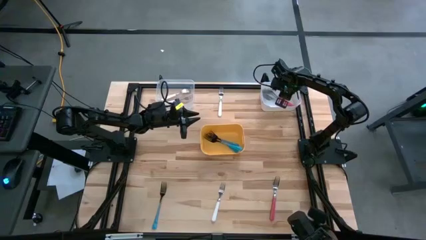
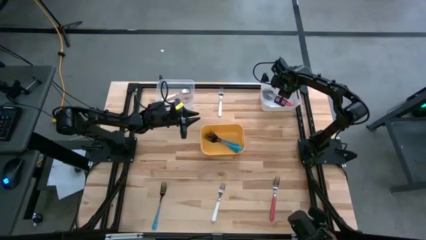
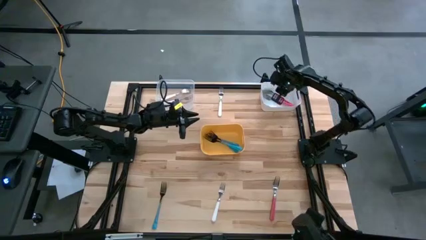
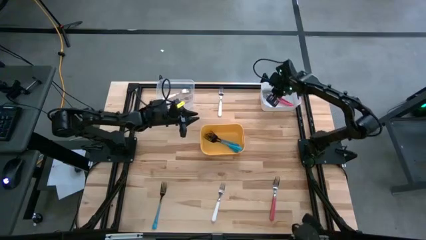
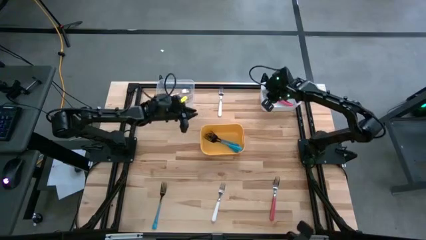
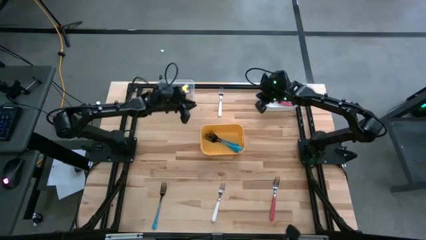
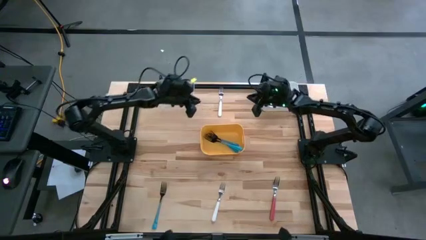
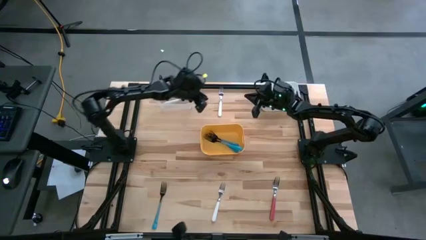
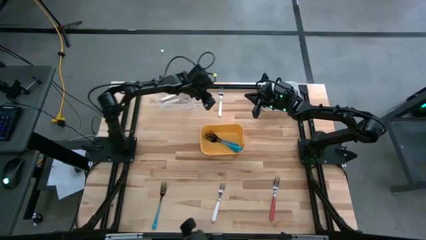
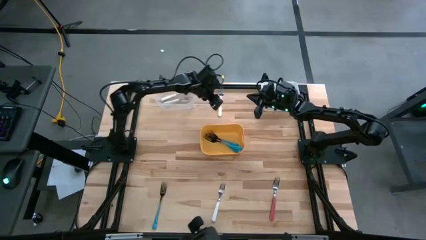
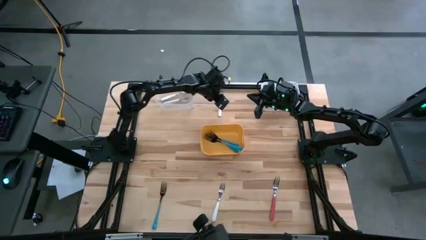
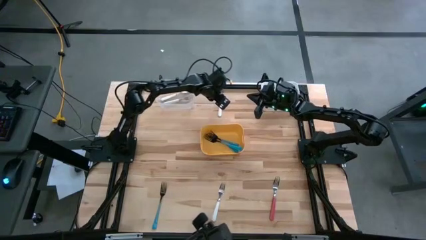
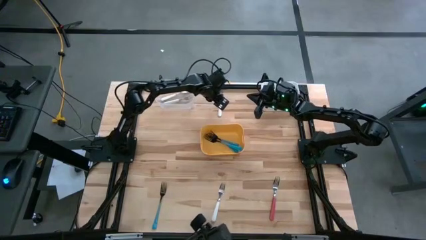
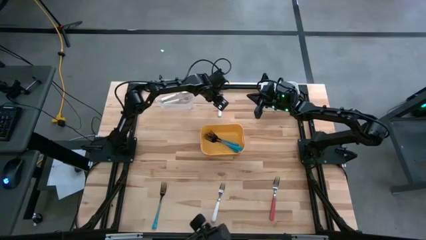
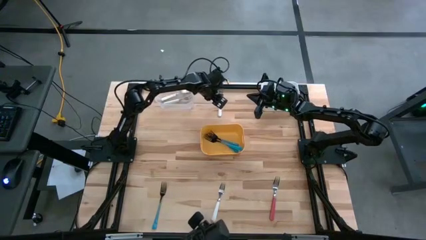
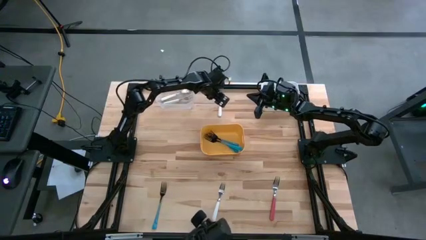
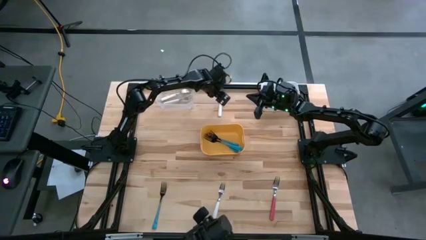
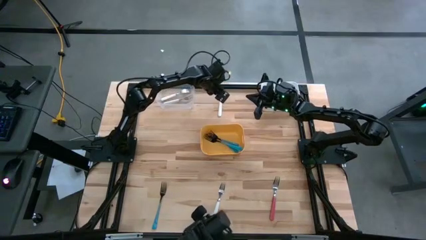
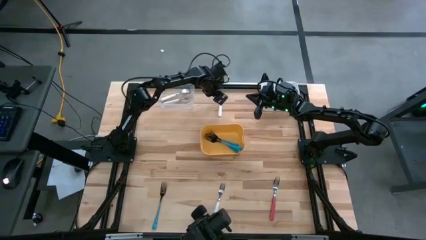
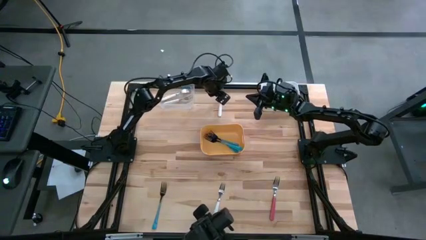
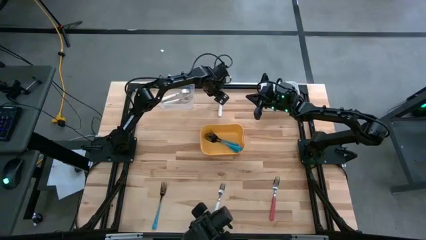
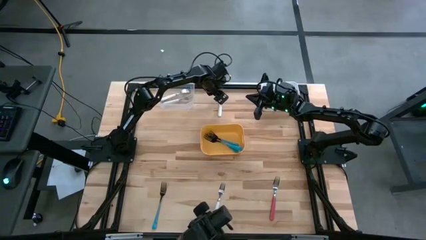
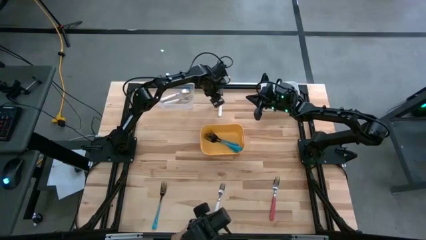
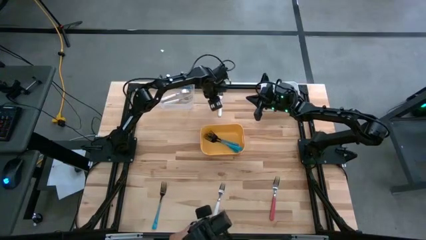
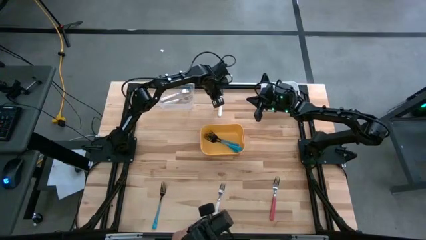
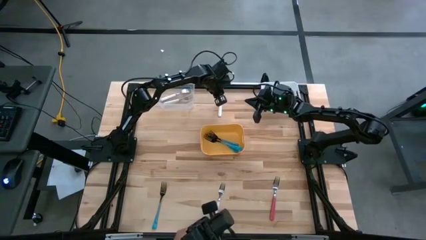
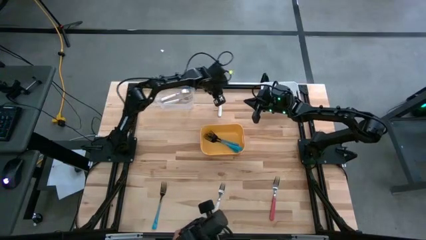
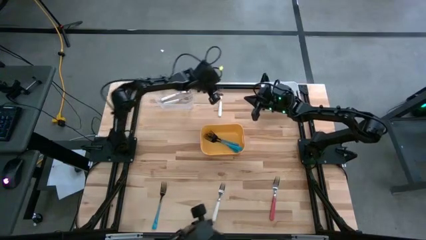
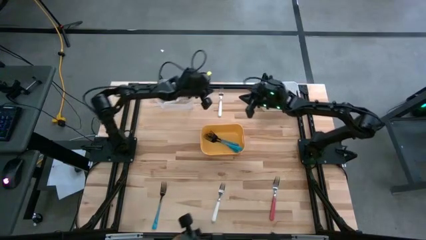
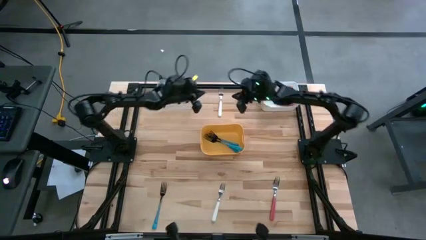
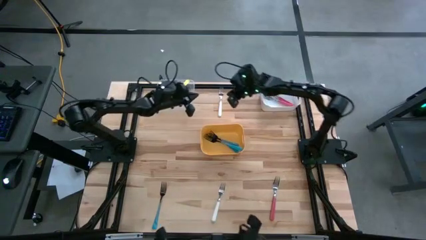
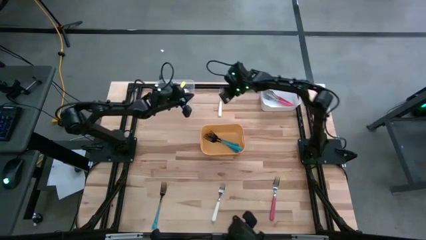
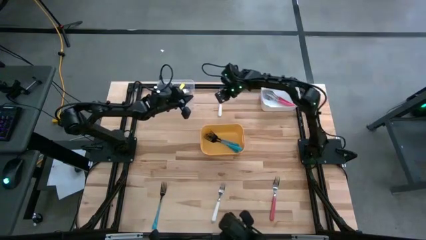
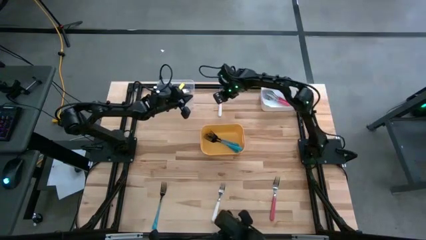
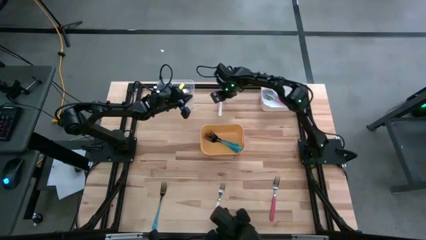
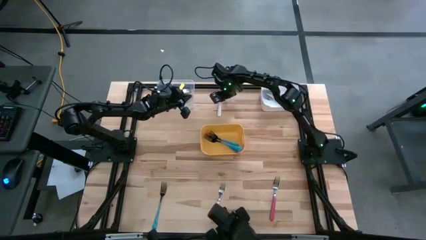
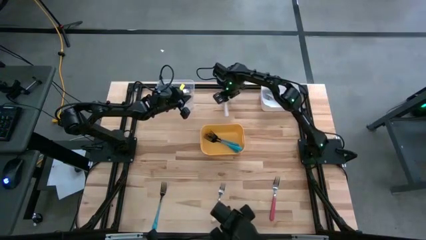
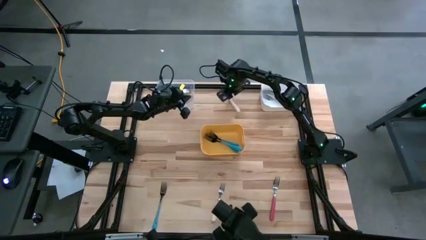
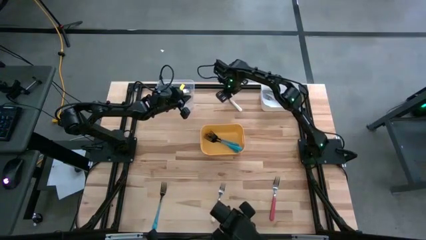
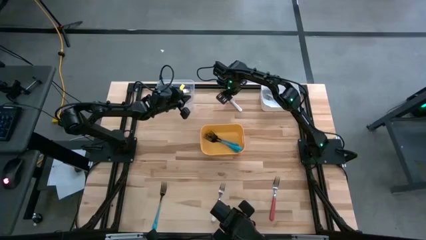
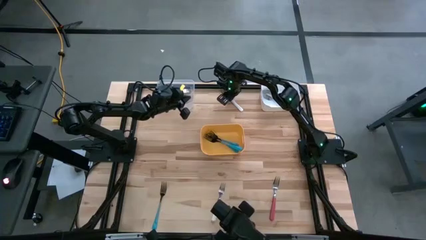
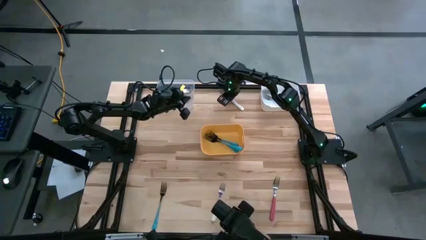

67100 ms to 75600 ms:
Task: Sort silverware by color (type)
Put the white fork into the transparent bin

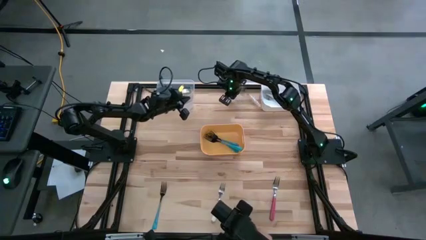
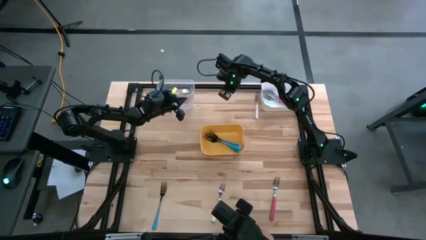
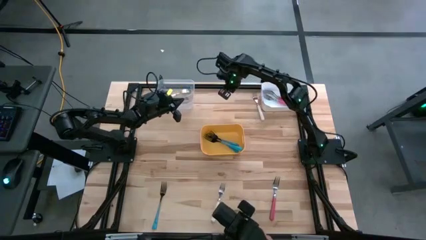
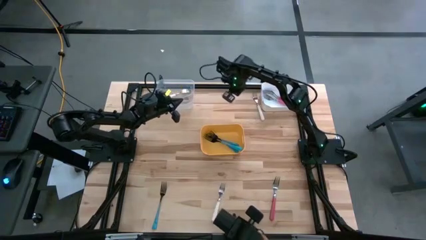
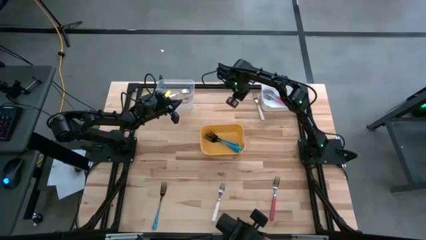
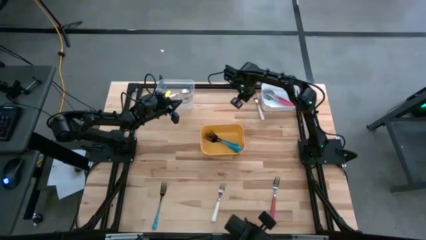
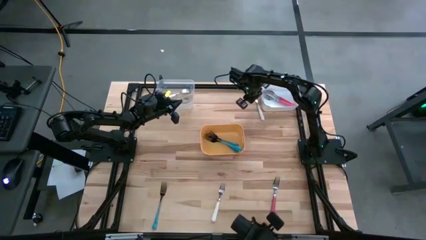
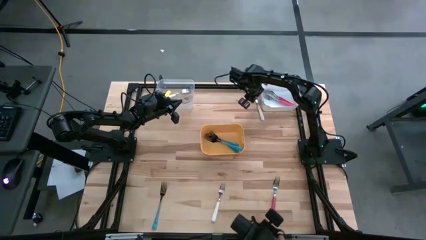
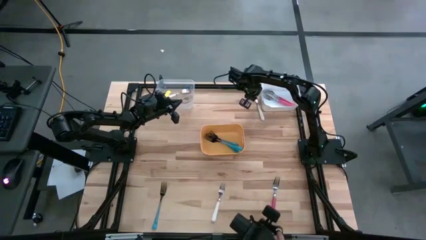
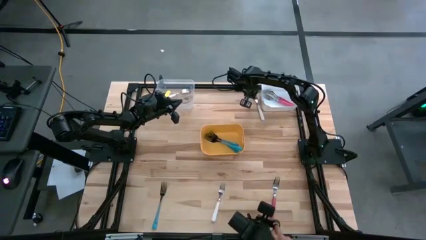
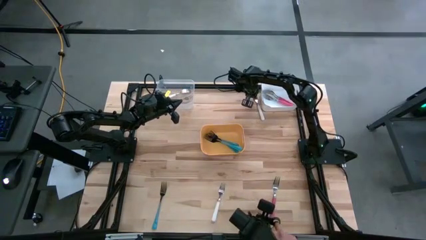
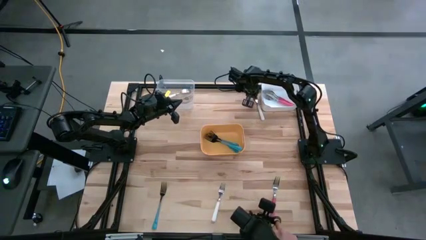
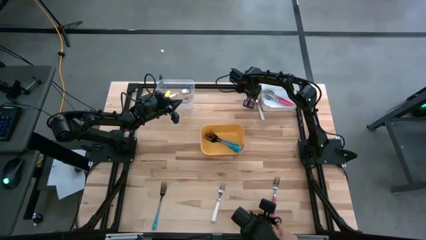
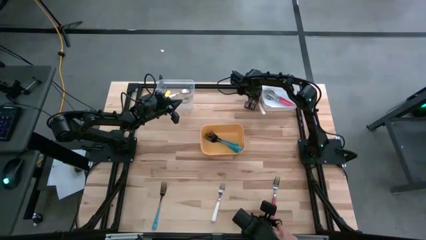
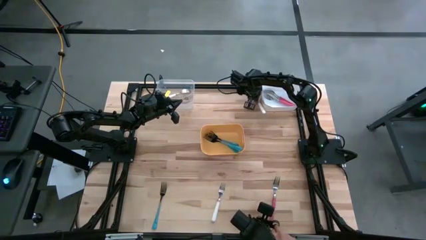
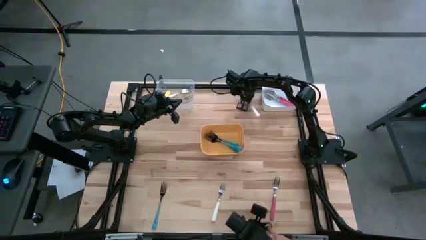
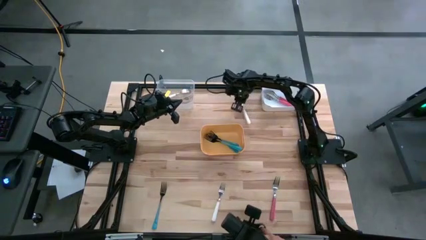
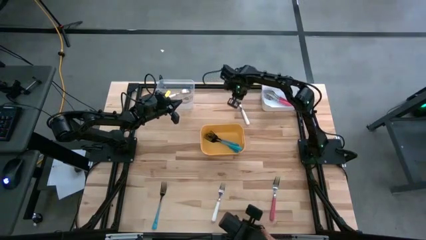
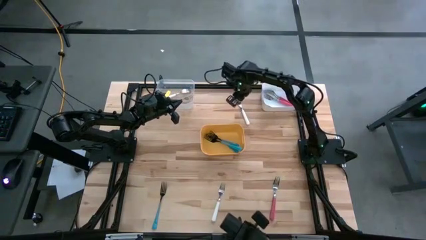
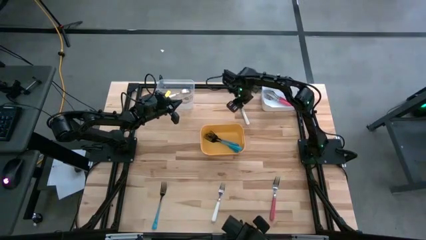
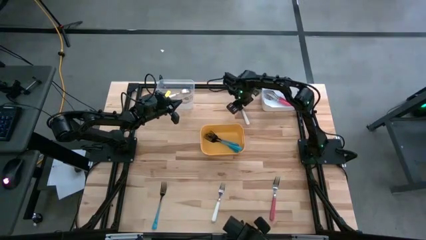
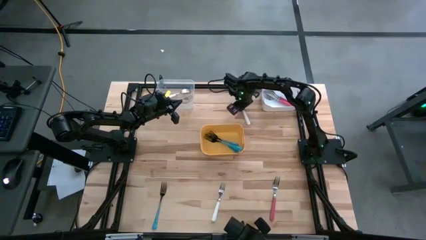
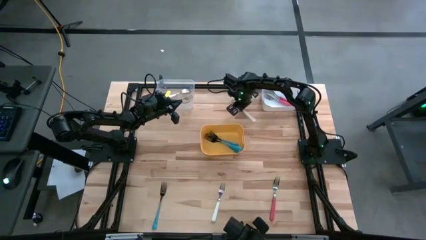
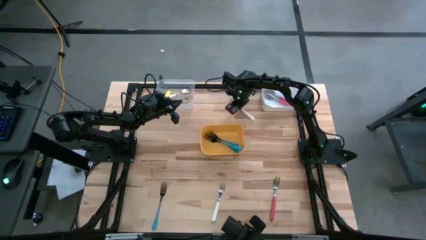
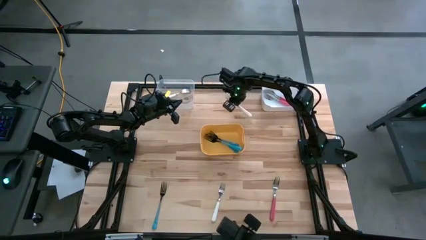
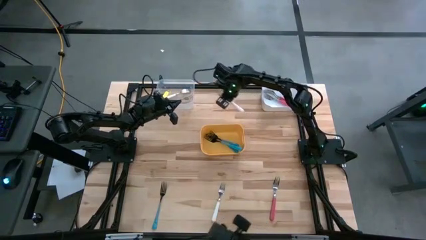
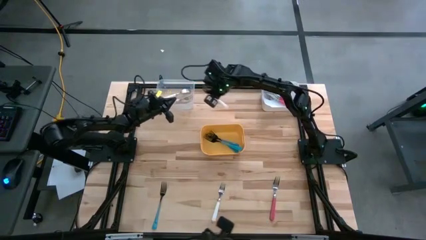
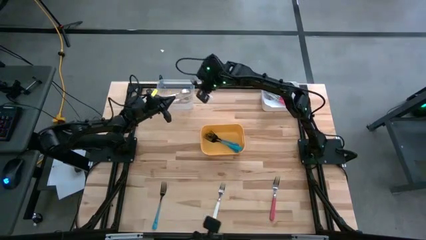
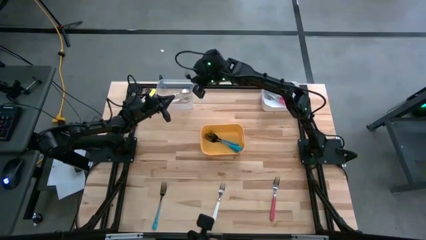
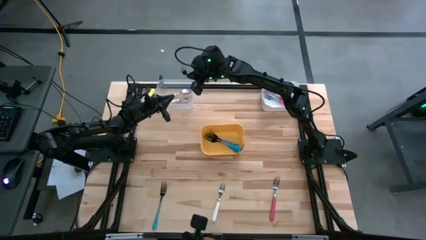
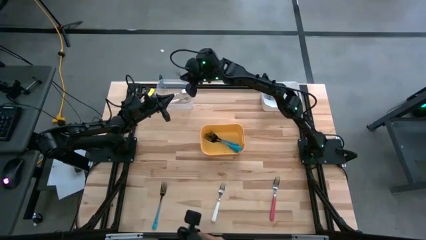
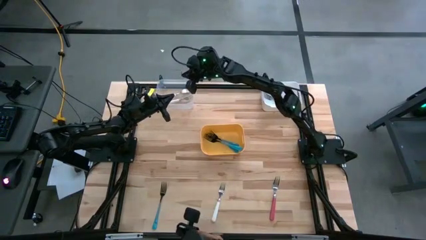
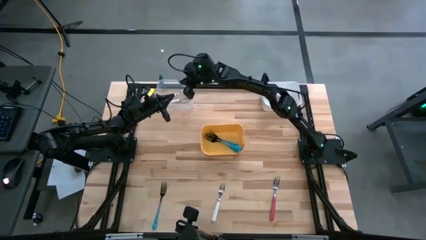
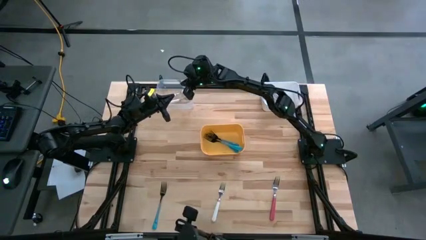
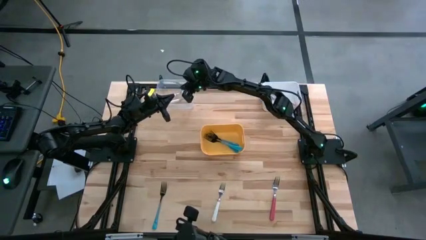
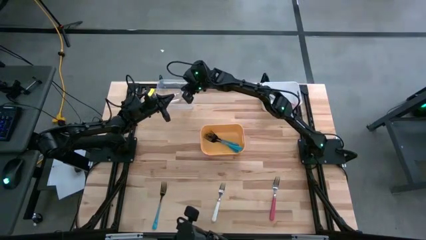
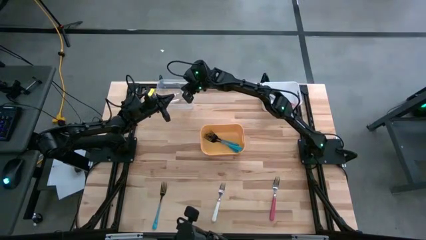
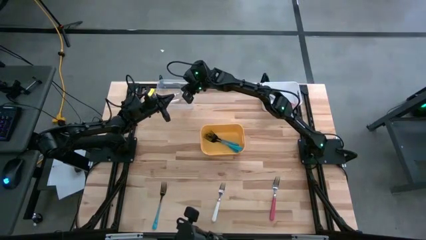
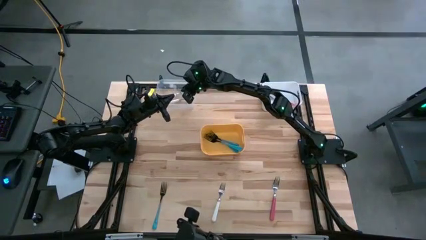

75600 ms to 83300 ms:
Put the white fork into the transparent bin
